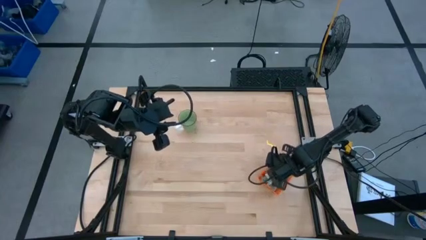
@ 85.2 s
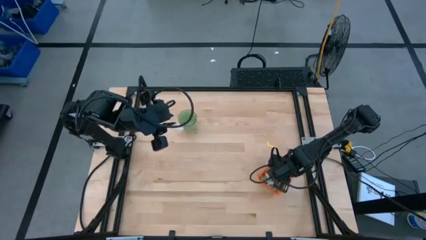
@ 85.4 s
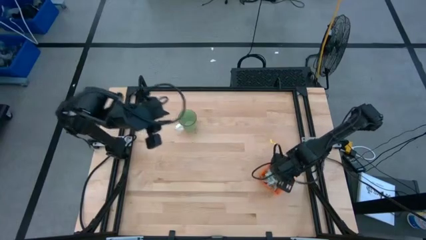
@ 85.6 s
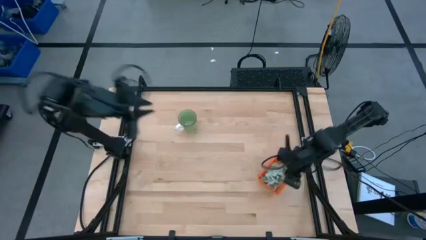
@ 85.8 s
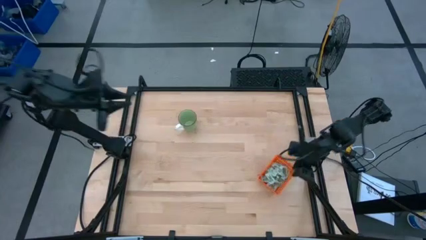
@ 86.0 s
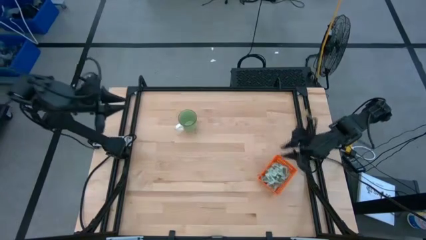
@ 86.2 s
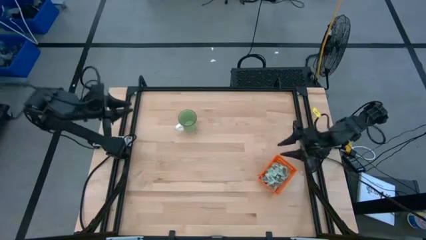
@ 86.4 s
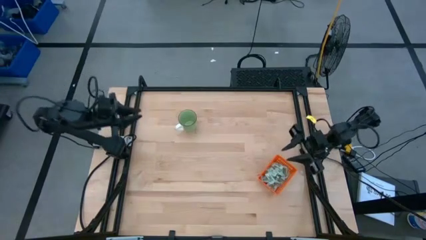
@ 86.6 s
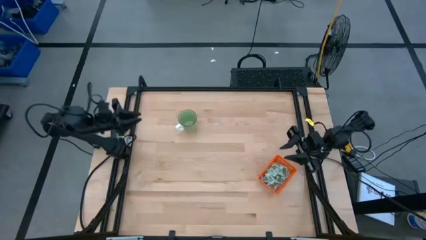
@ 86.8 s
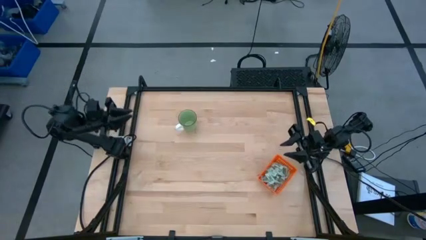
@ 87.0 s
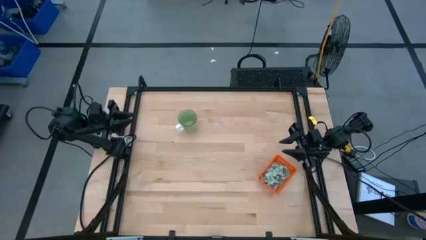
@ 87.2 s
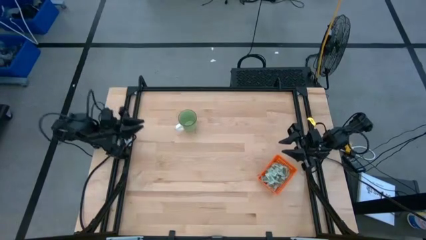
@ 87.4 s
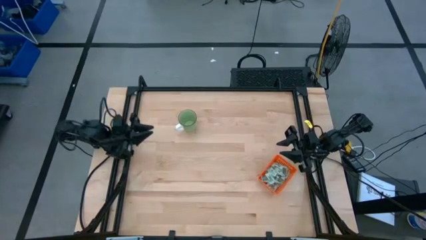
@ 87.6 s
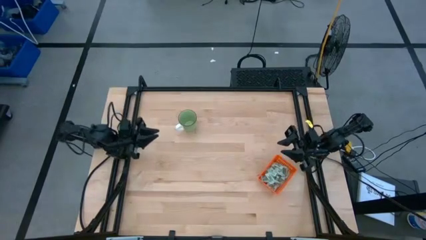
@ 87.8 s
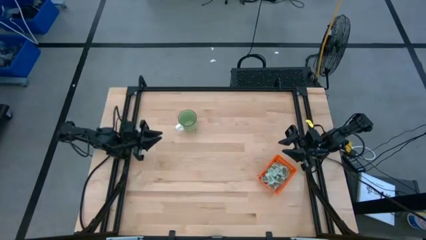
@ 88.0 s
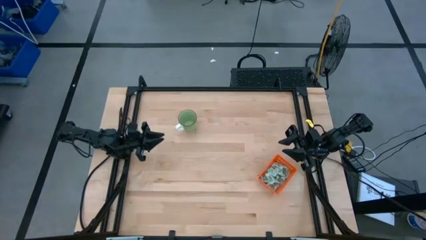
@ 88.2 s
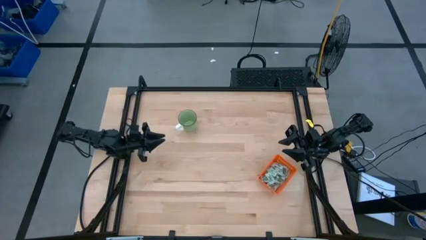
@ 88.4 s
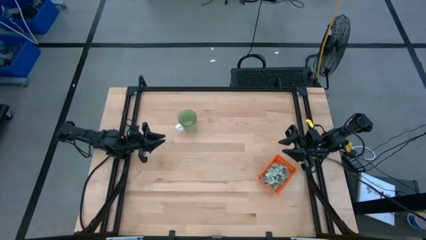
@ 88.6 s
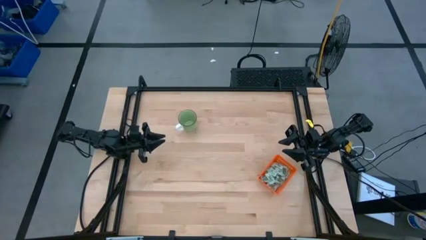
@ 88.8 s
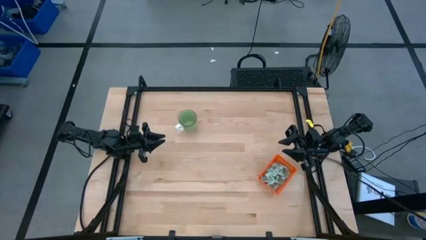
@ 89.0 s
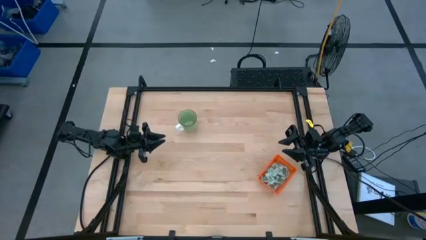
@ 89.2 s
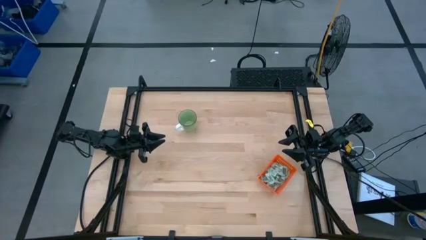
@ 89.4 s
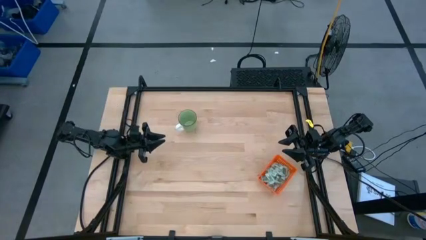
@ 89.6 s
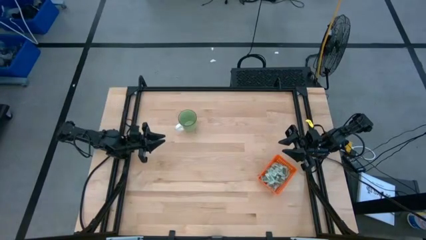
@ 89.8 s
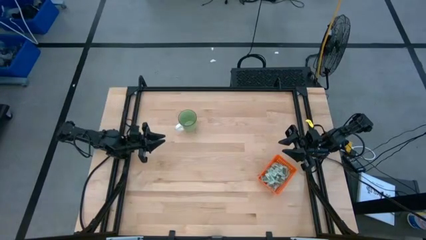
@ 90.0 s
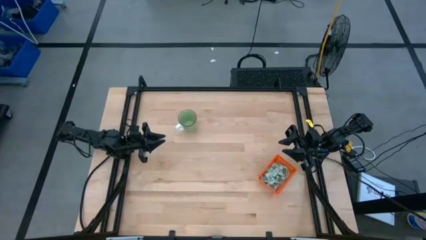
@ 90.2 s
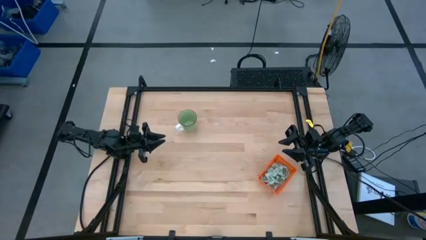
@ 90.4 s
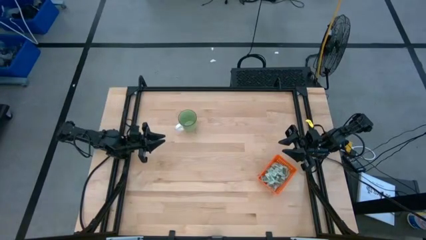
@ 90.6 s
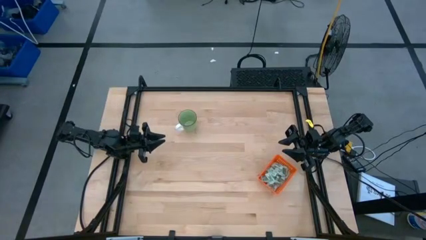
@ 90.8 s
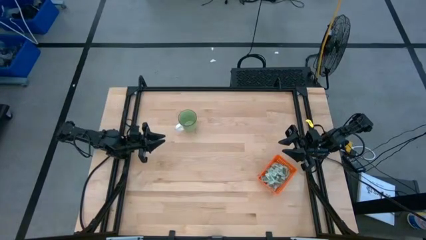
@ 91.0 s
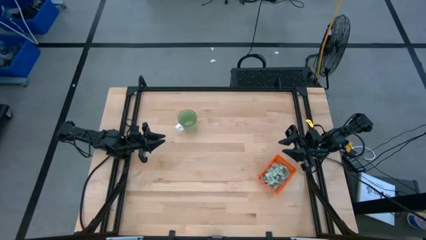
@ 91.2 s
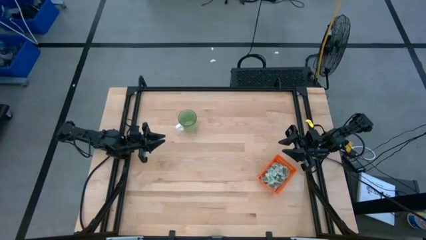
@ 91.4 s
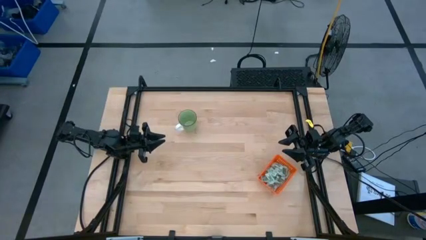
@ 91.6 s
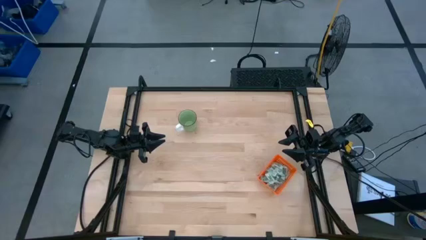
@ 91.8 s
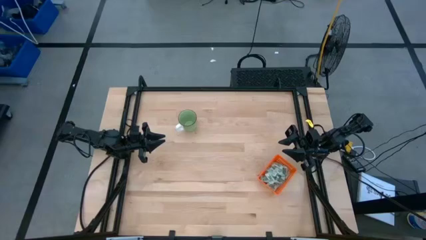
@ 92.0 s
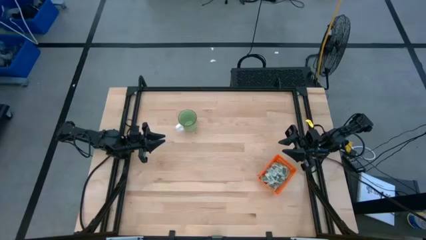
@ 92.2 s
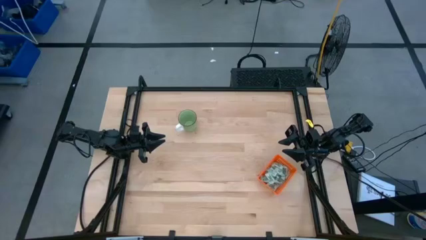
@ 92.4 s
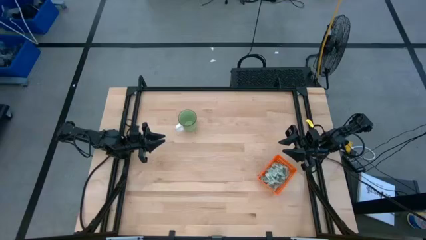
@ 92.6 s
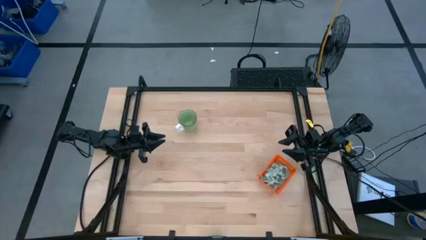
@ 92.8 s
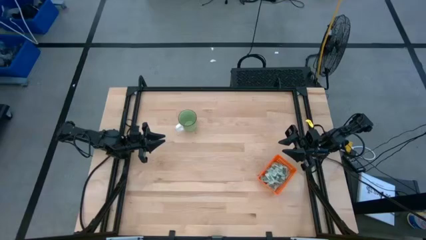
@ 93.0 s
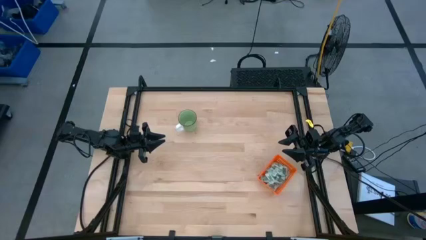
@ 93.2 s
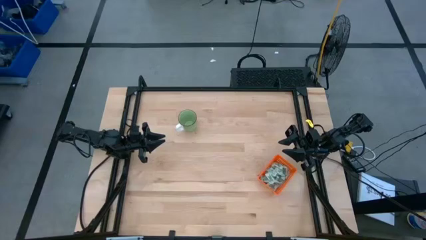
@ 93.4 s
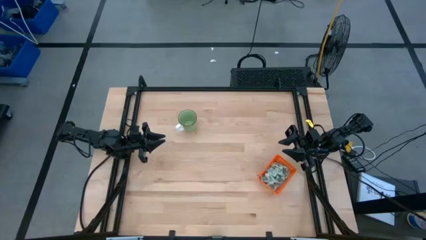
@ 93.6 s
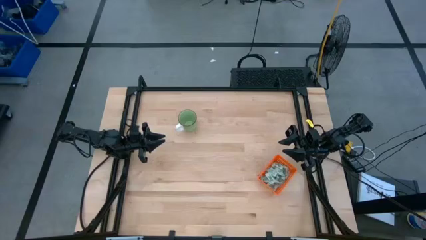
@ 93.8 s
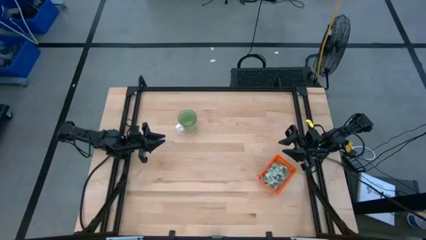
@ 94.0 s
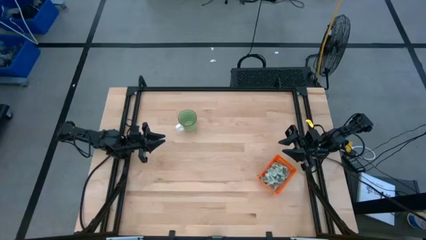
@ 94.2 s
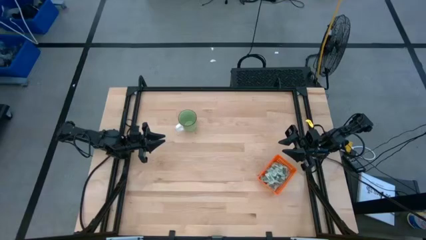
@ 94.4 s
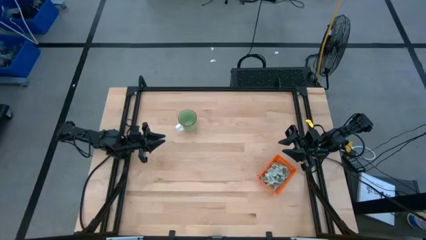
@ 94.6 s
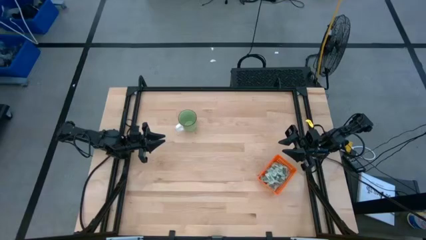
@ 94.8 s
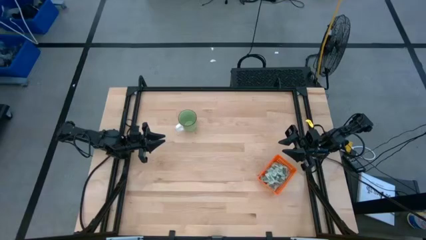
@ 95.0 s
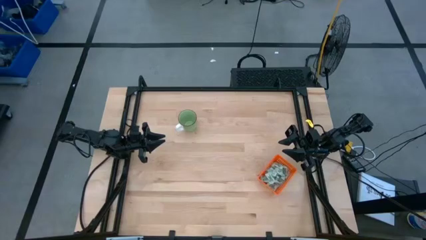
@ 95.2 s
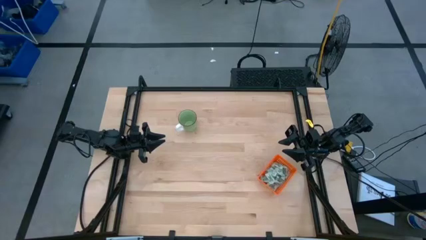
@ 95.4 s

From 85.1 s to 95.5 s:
Task: Pick and place Stevia / Truvia into bins
Return to Home Position

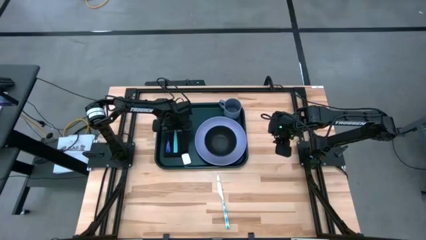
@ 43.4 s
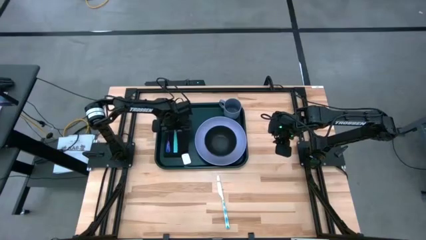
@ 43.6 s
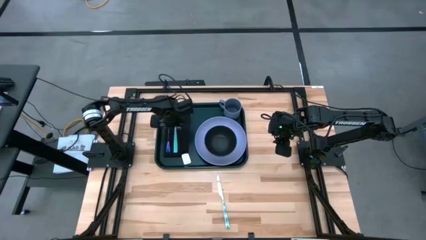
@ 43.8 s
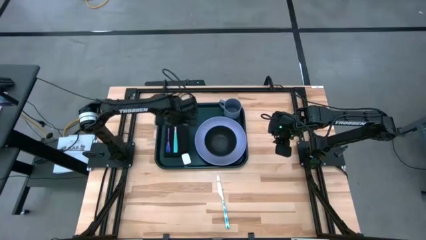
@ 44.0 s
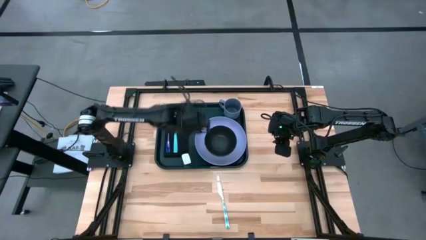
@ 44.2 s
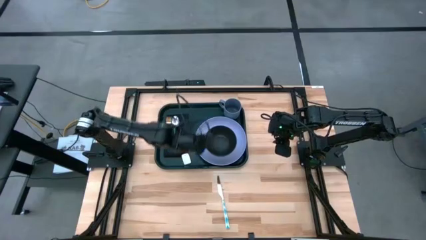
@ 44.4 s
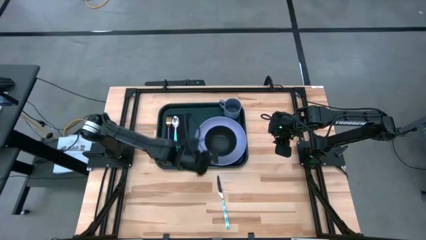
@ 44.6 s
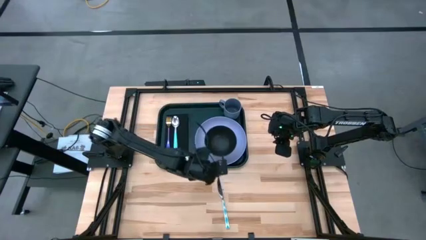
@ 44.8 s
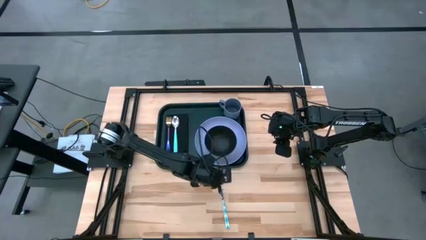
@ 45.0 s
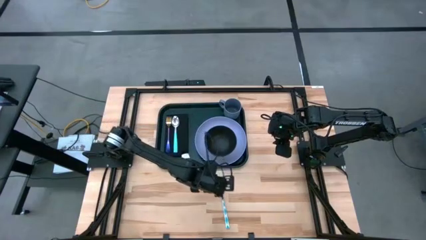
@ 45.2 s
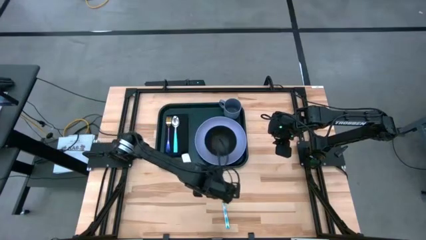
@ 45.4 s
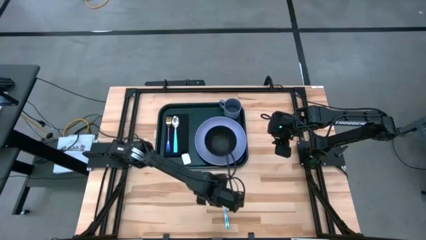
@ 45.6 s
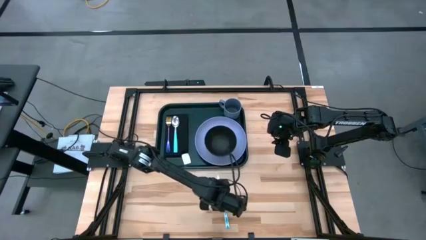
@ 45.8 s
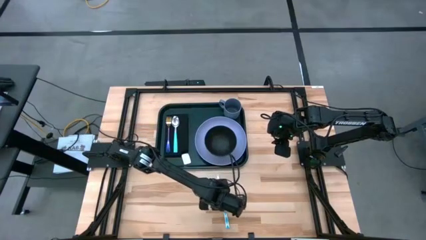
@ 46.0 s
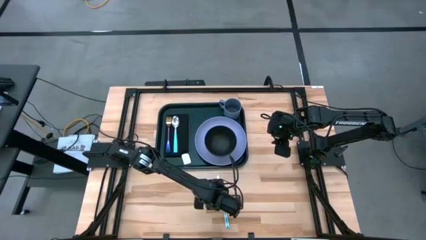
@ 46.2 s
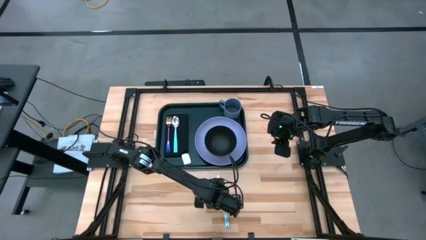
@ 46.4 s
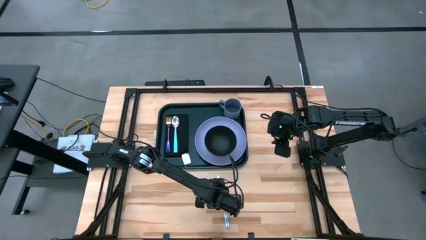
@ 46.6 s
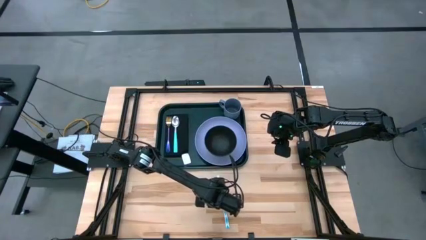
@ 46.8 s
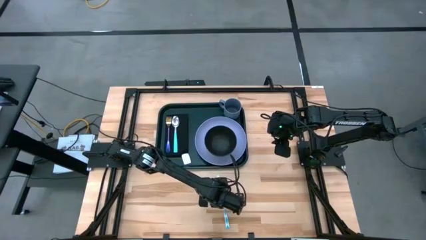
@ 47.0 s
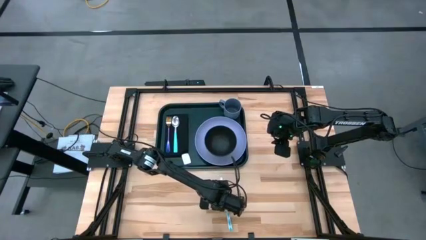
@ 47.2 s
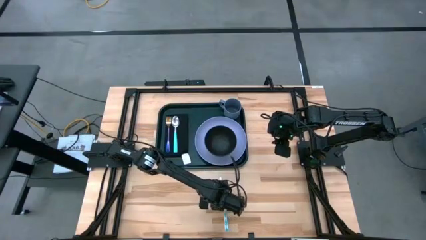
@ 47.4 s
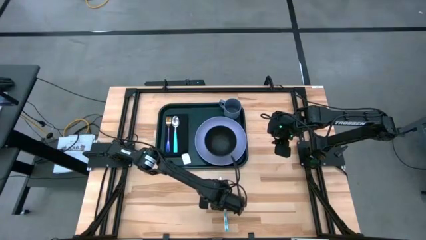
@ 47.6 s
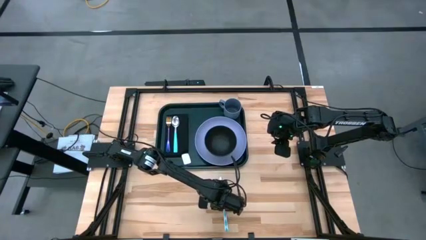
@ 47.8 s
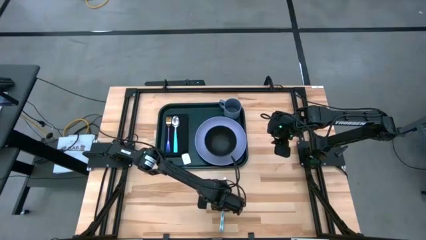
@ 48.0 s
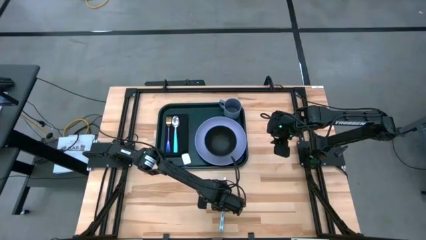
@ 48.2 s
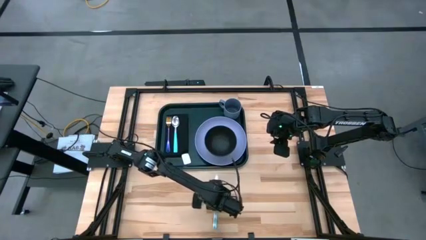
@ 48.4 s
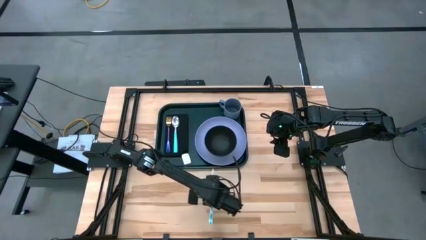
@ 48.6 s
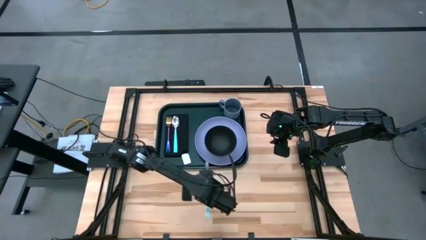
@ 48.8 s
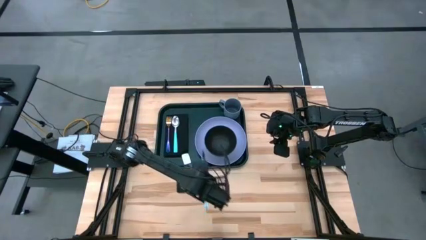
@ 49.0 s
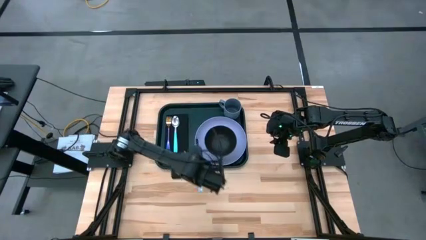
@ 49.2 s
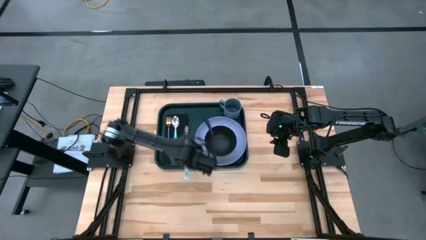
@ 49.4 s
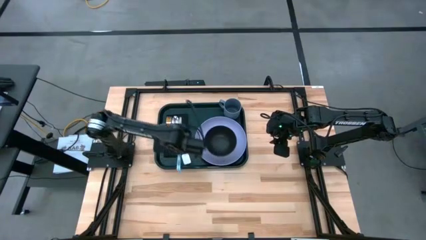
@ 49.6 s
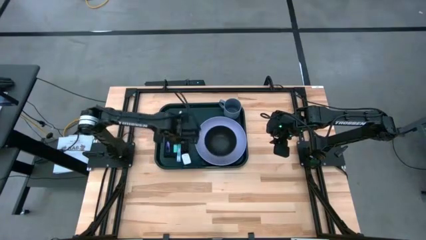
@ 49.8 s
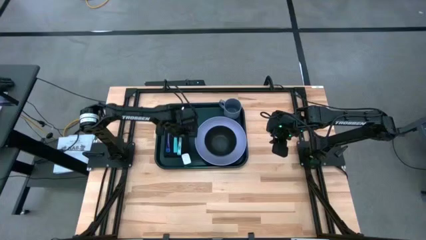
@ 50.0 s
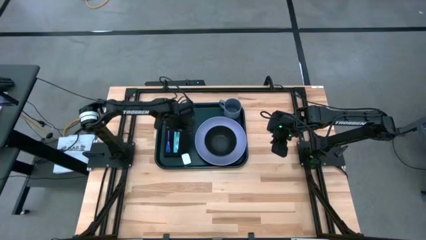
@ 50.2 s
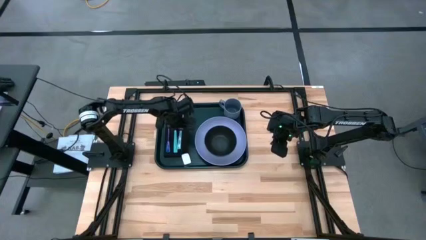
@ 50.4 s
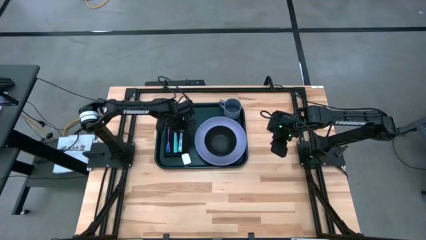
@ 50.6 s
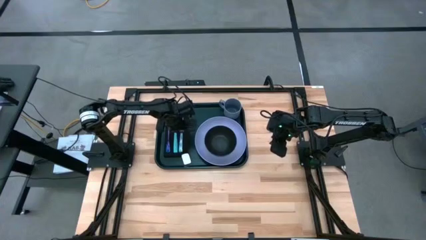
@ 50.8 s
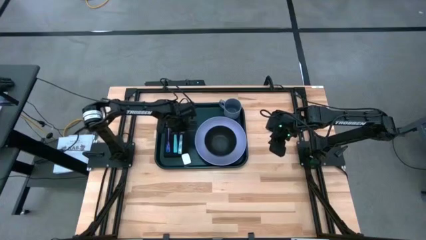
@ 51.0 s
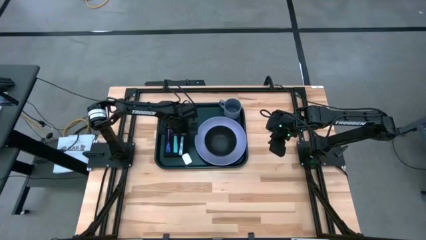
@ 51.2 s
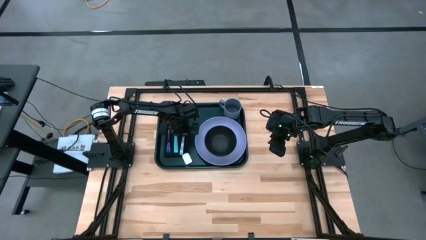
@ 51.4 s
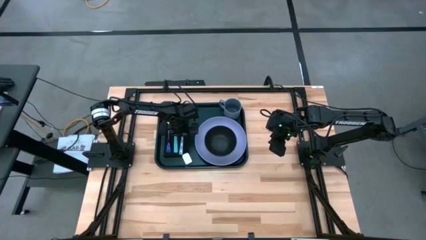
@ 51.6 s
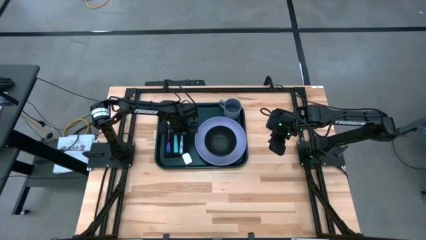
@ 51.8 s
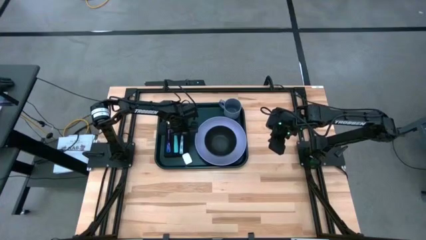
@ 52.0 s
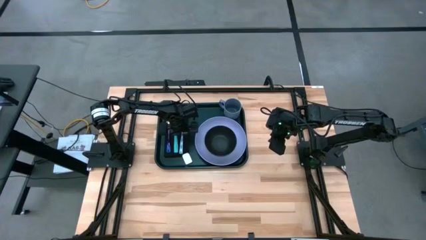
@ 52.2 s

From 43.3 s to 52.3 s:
Task: Set up tray
Put the blue knife to the right of the blue spoon on top of the napkin
